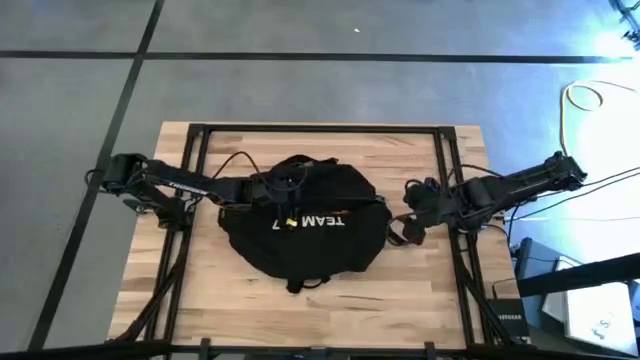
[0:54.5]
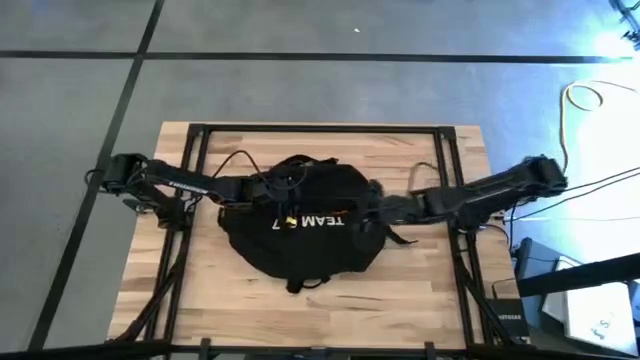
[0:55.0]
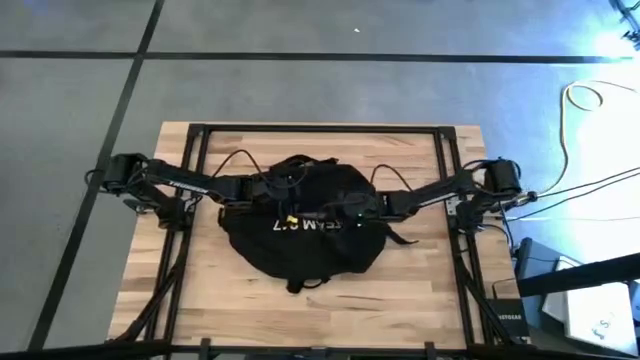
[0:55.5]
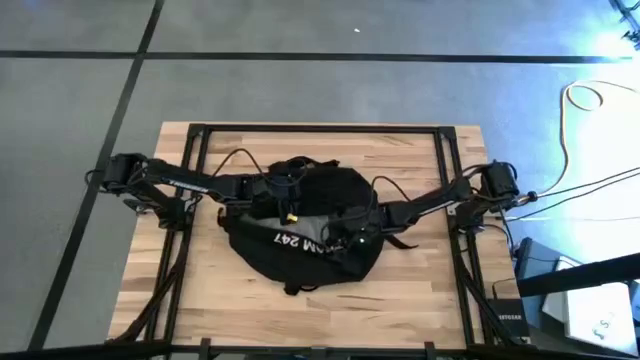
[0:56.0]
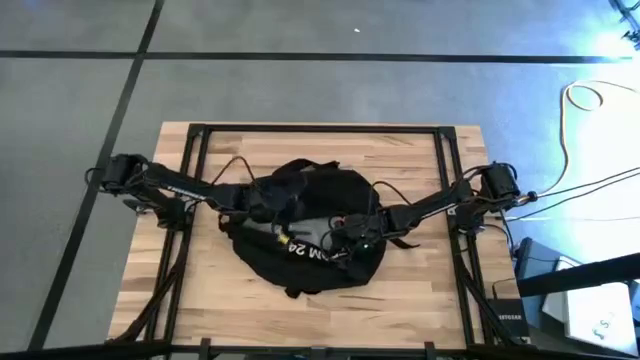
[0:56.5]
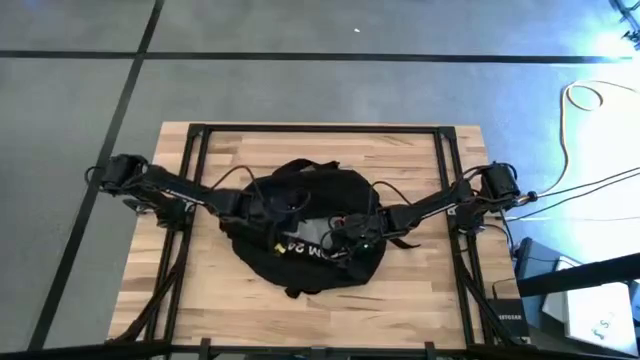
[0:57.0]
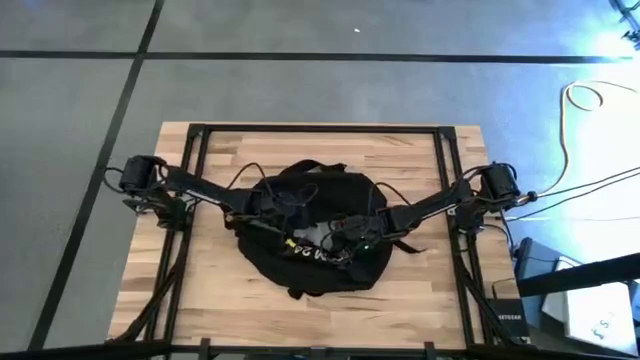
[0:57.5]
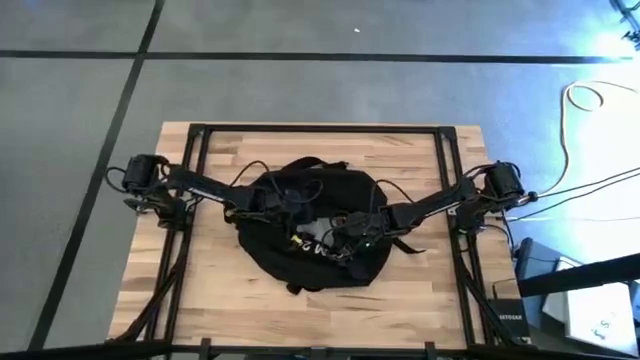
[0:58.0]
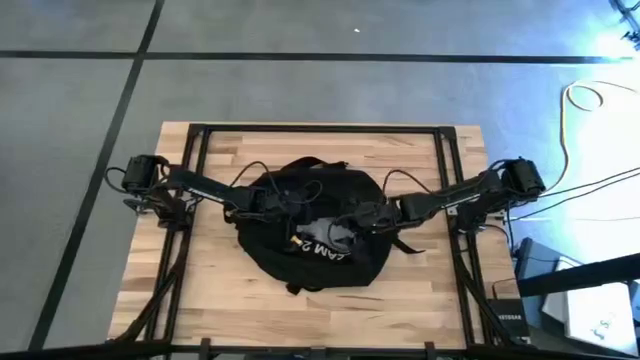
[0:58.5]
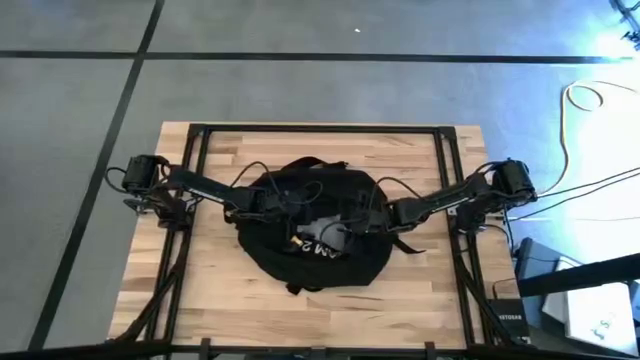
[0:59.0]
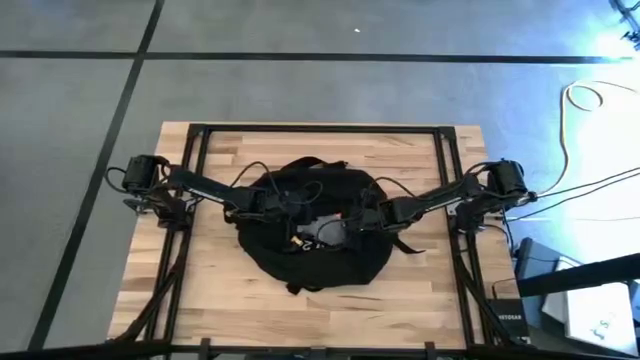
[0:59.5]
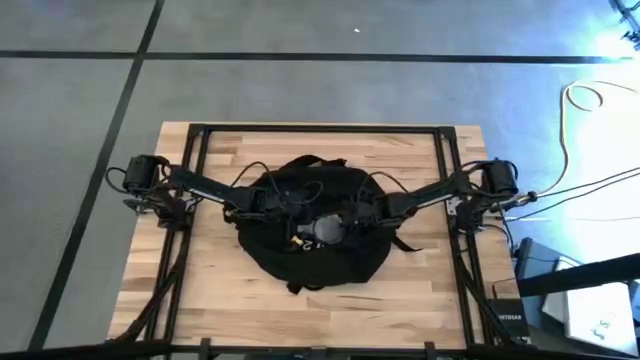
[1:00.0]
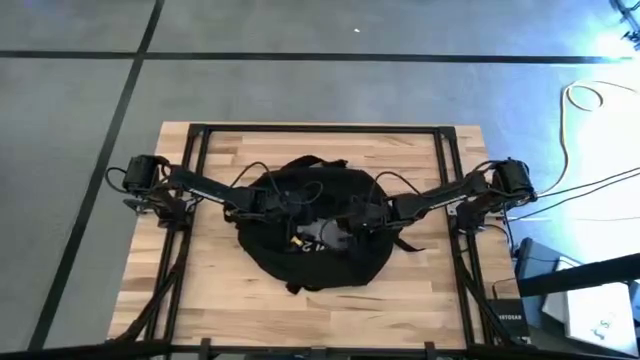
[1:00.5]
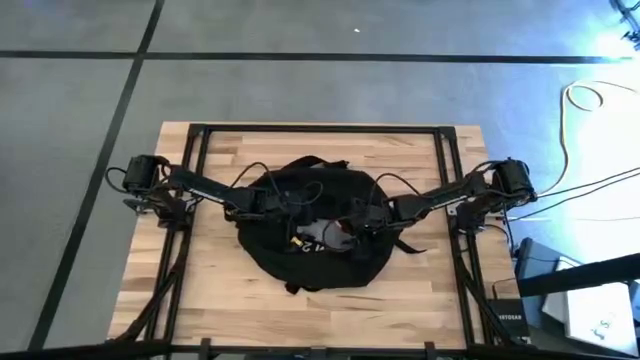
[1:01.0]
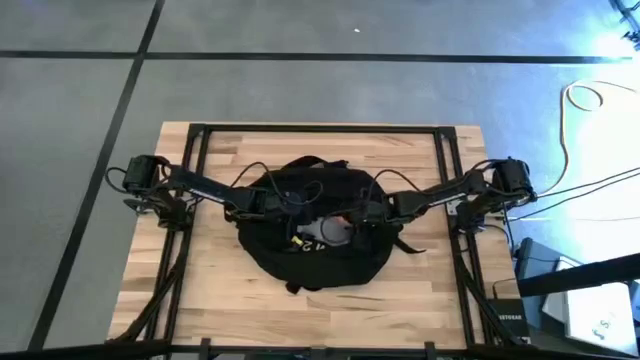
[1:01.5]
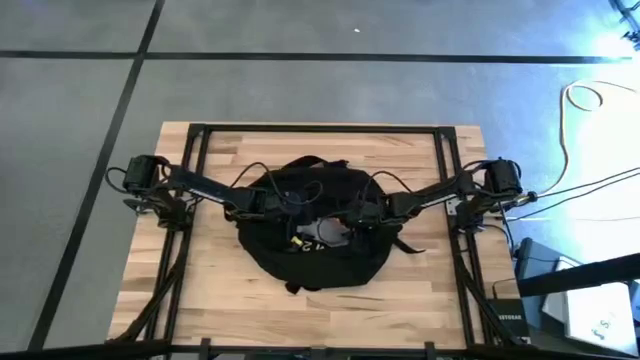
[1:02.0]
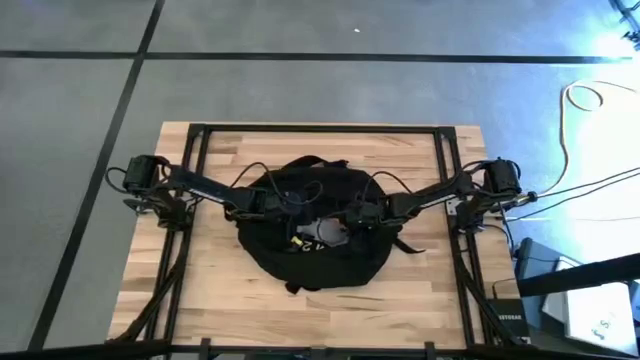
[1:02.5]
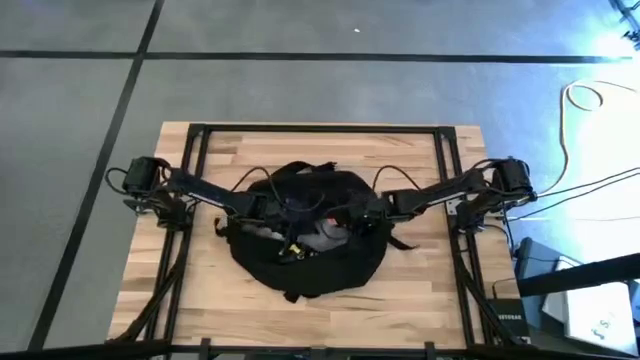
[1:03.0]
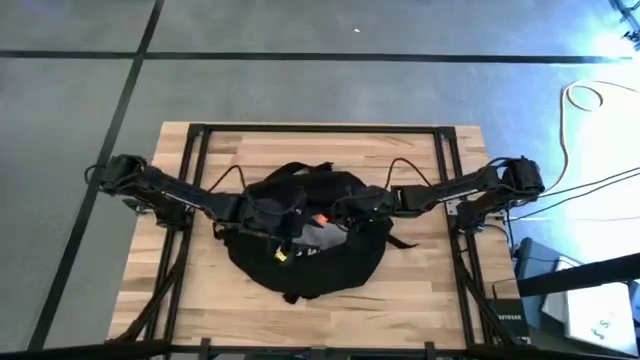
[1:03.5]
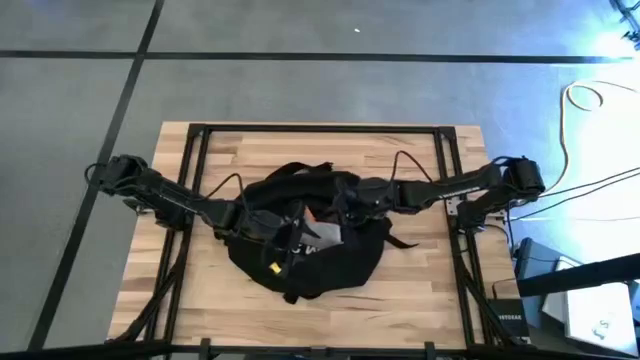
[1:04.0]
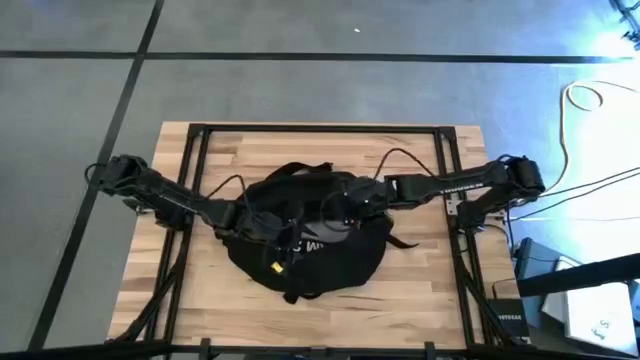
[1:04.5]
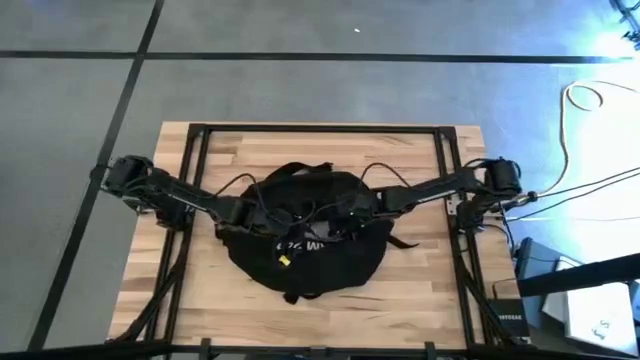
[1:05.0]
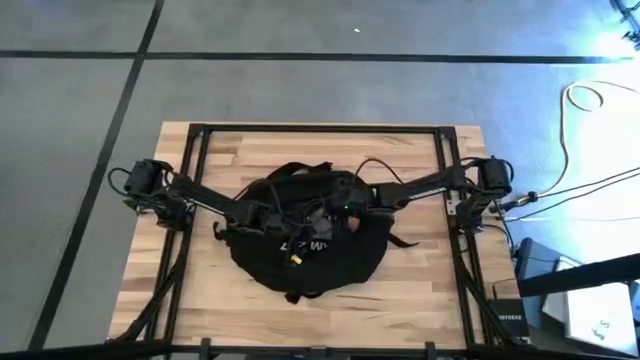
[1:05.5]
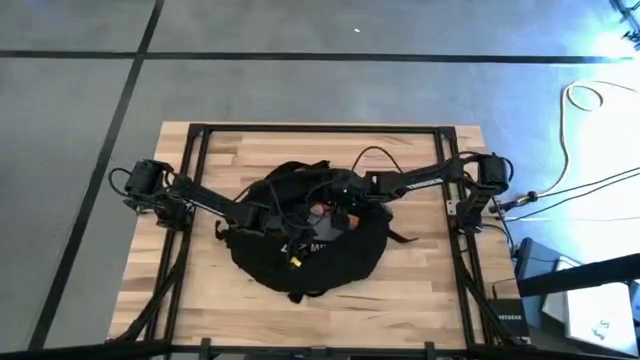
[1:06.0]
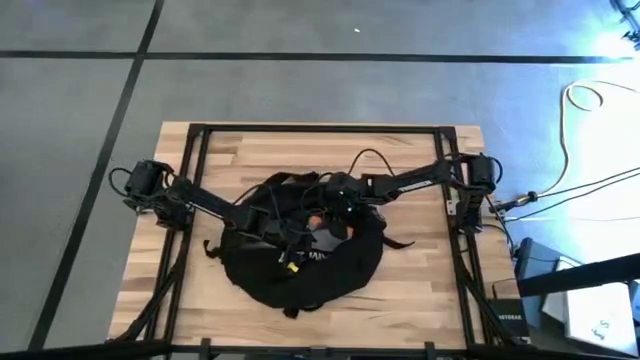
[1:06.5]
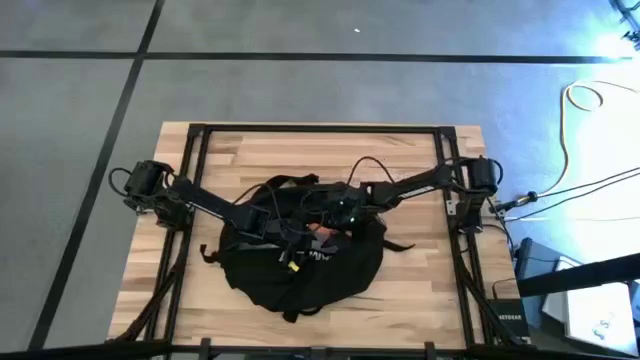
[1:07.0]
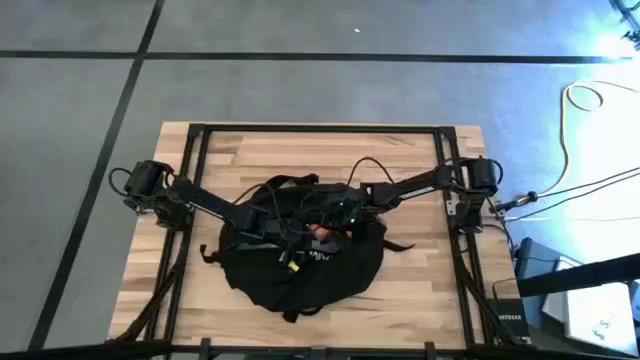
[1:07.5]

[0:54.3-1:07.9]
Task: Unpack backpack
Remove the transparent white zip bag from the black backpack

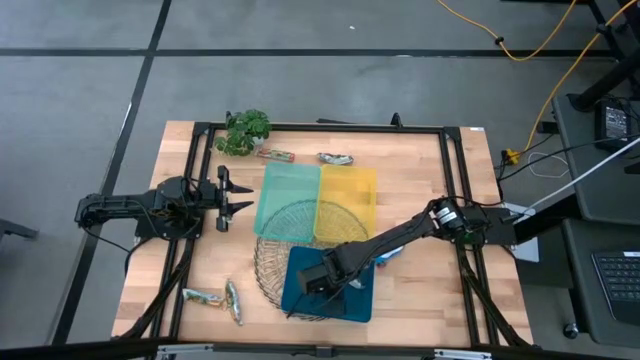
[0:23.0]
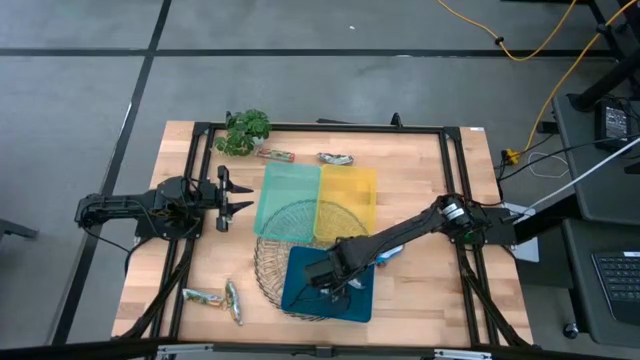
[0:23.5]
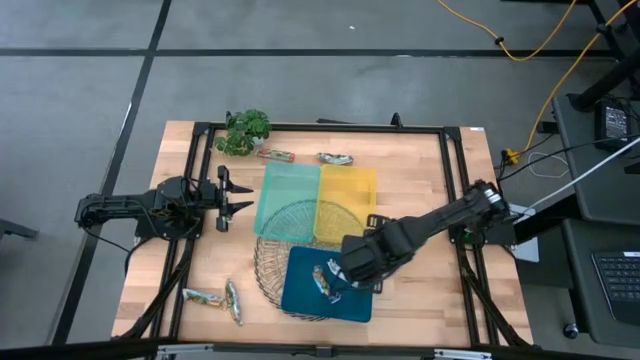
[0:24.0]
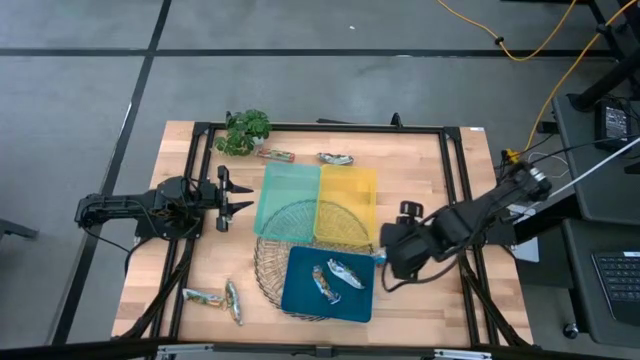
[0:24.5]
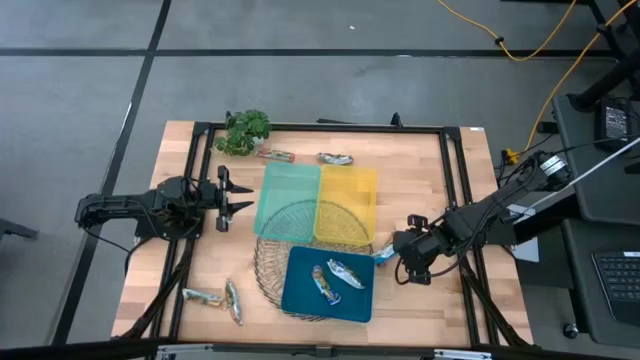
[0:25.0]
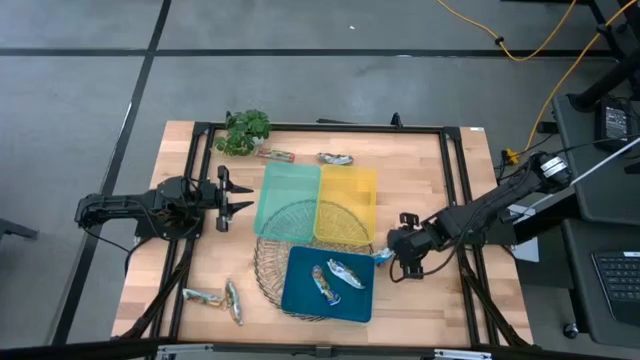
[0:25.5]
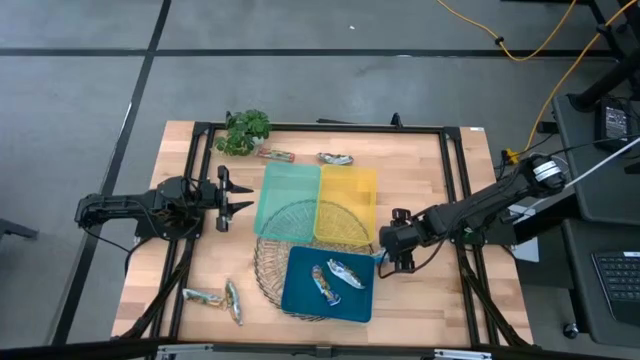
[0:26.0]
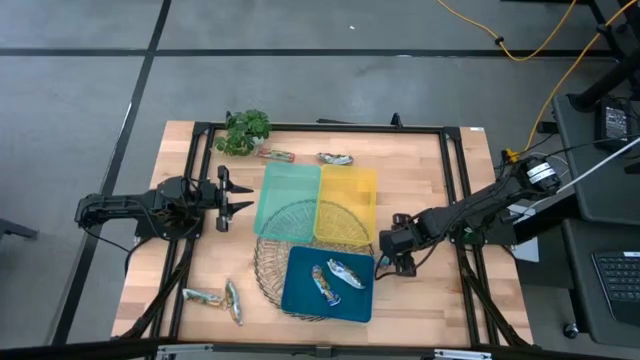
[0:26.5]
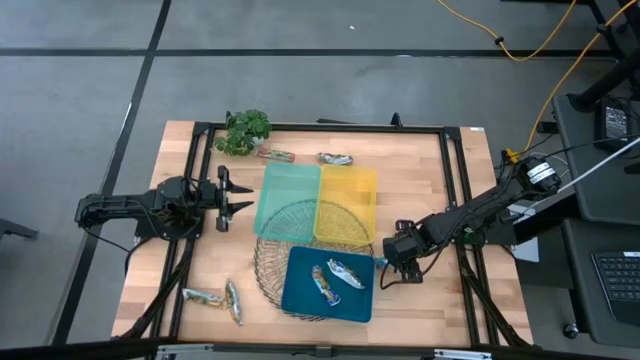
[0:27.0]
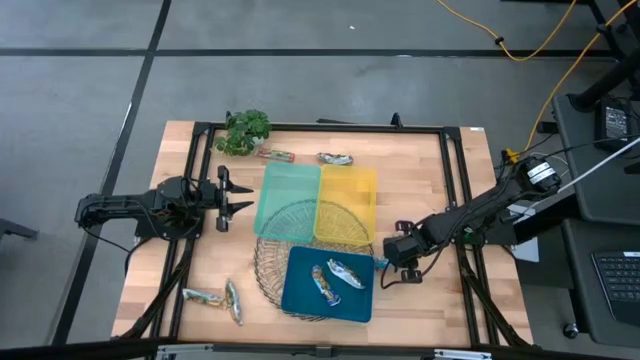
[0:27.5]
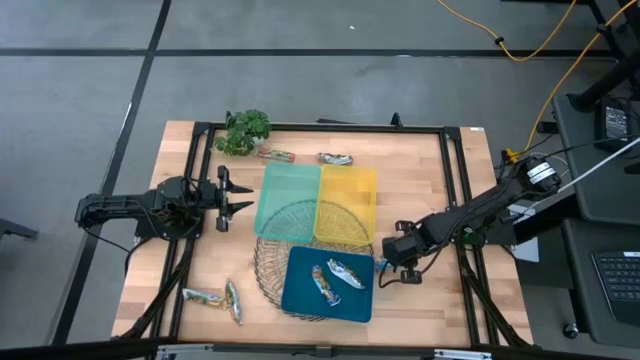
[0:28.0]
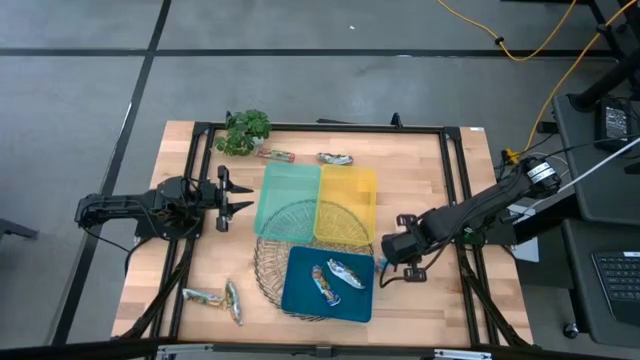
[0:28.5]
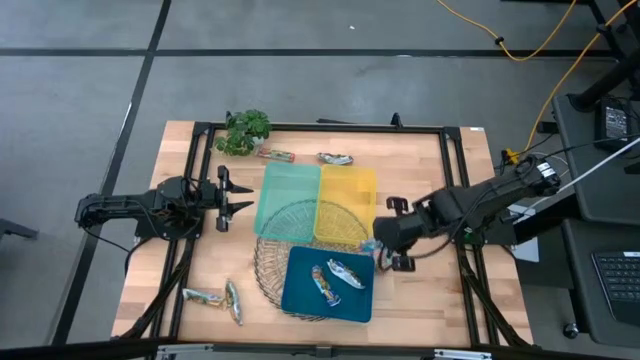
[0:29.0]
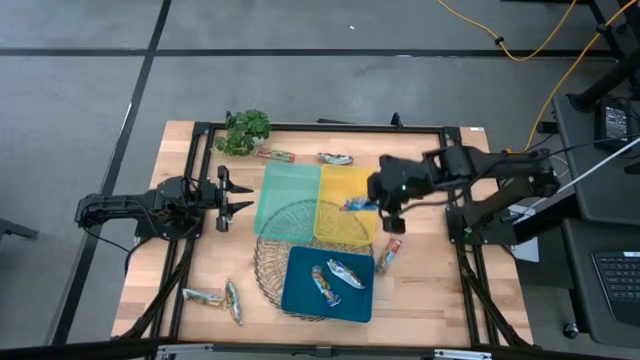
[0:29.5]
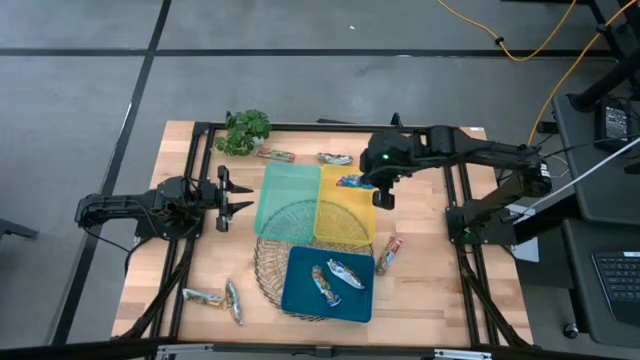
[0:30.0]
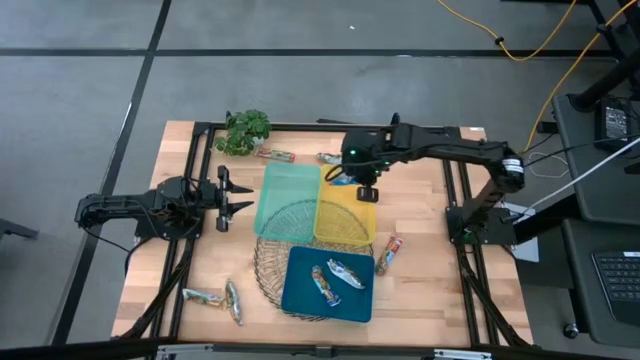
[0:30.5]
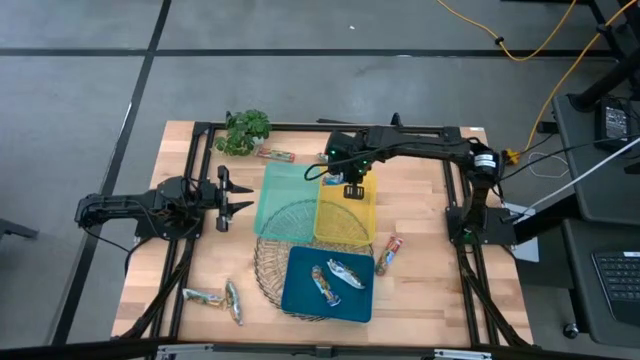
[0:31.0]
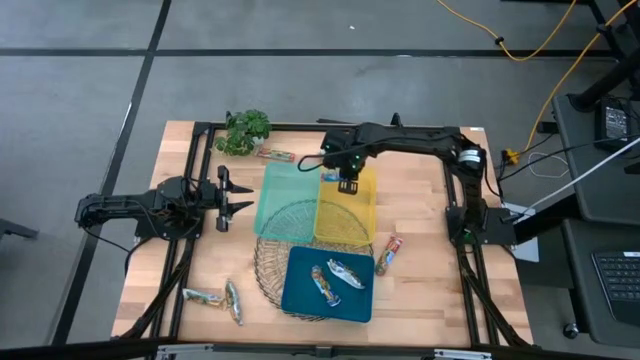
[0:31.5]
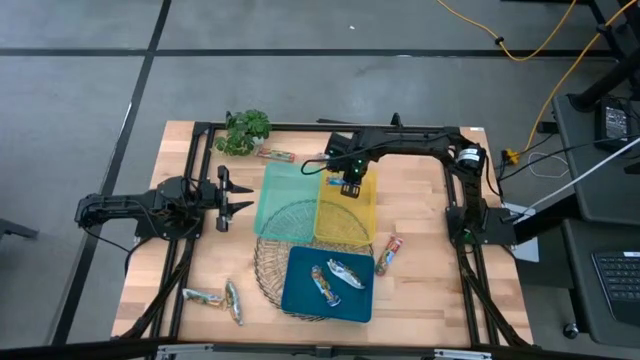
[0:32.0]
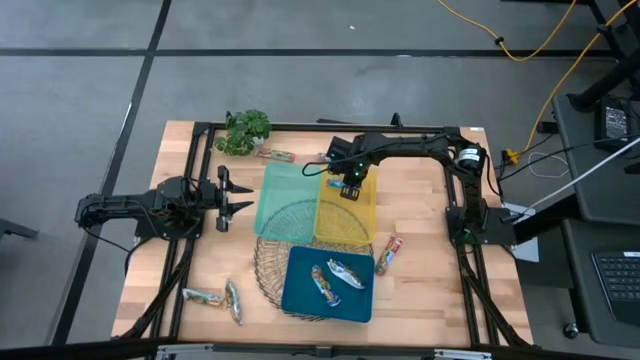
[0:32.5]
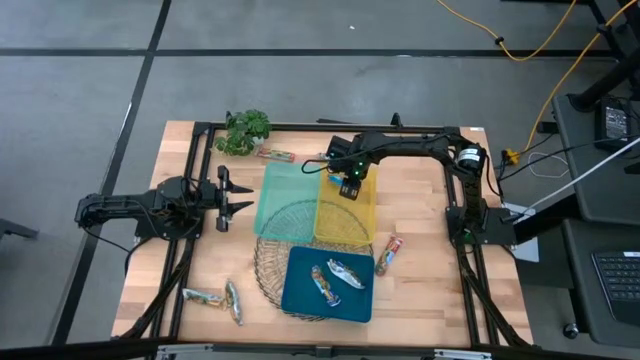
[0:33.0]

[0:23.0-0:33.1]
Task: Pick and place Granola Bars by type
Put the red granola bar into the yellow bin
